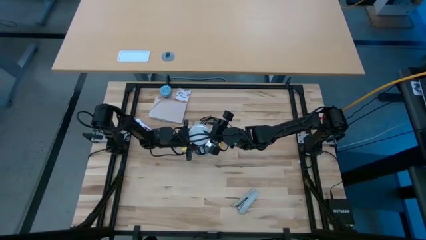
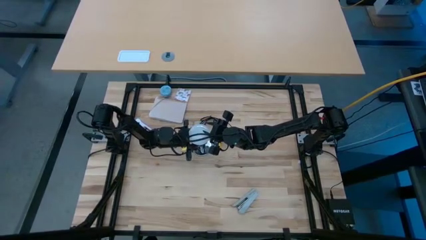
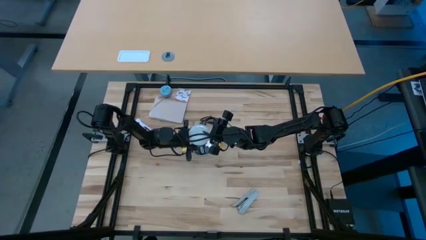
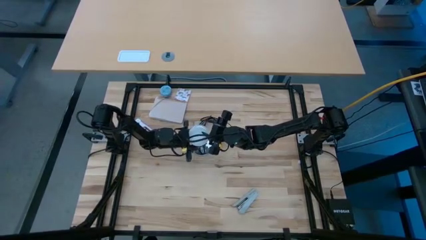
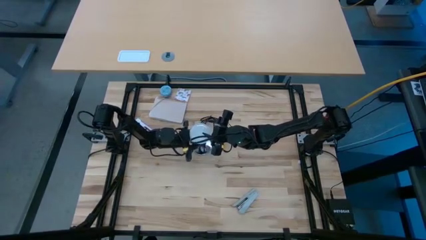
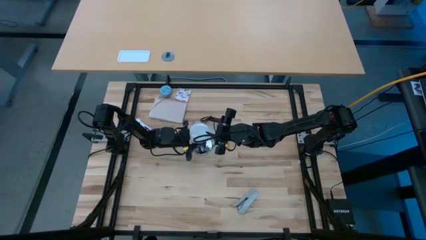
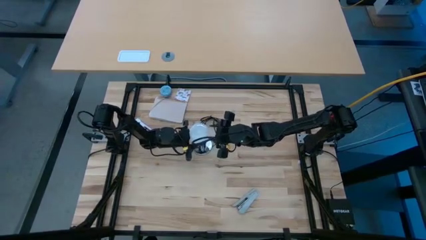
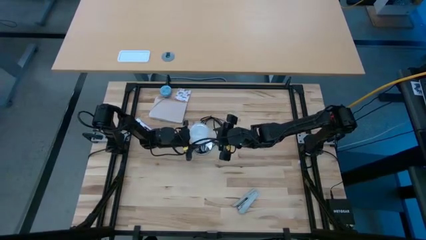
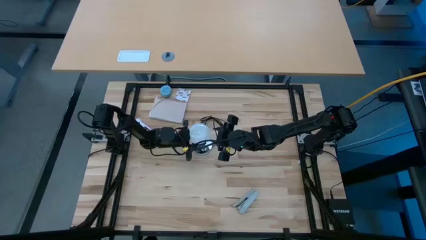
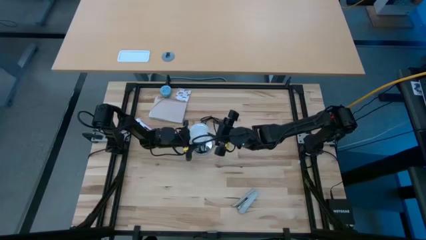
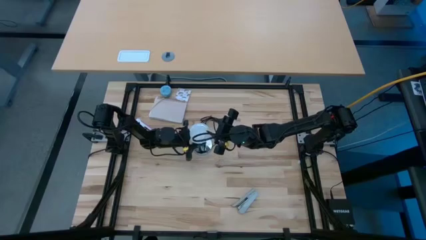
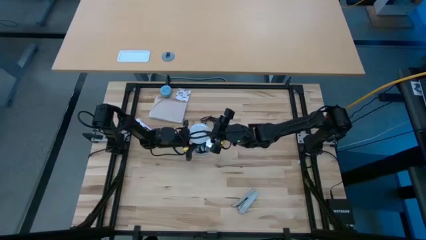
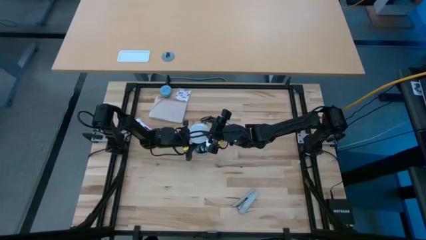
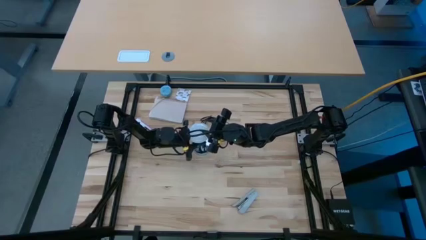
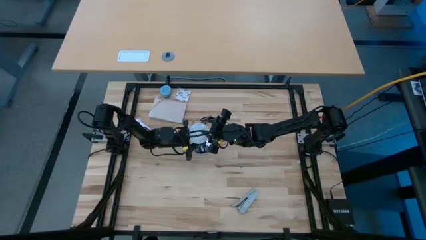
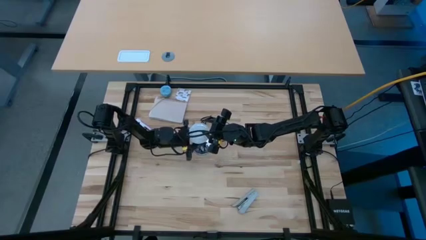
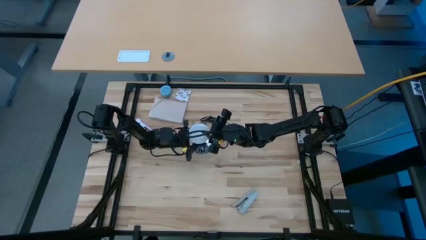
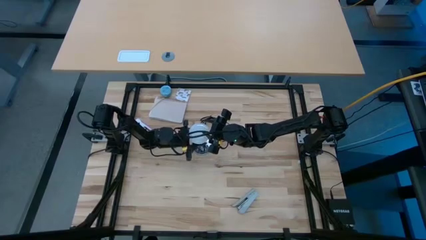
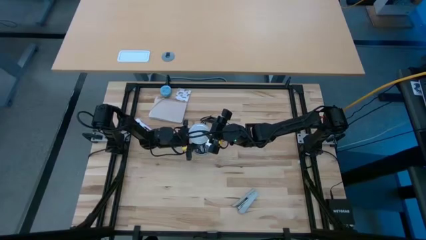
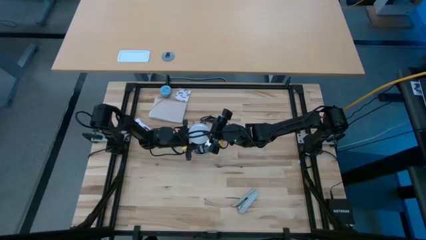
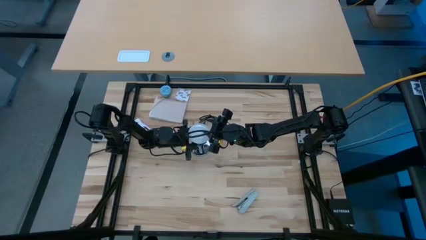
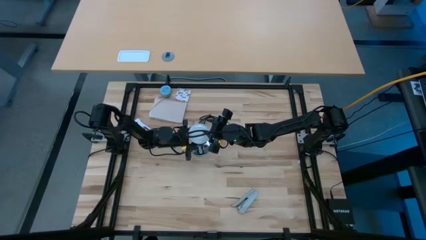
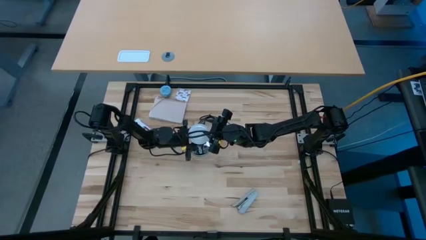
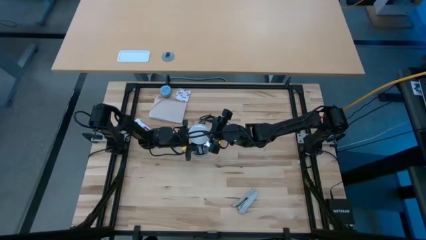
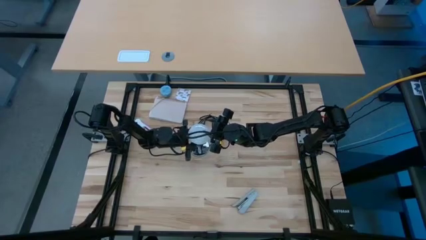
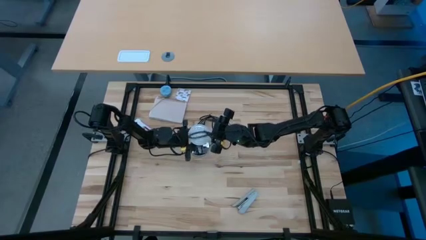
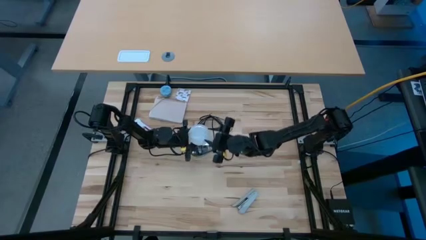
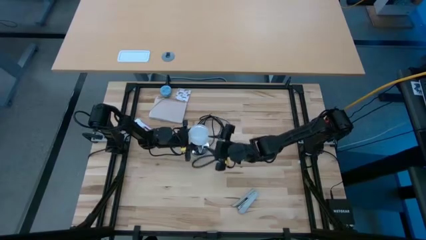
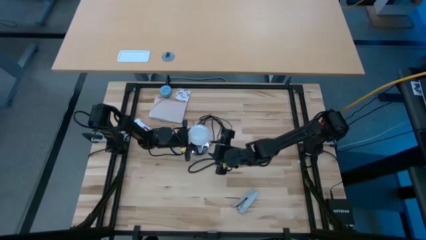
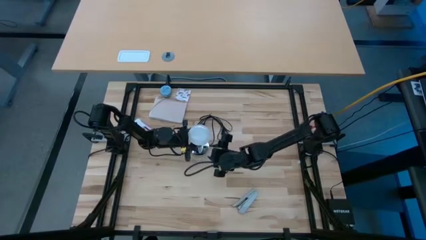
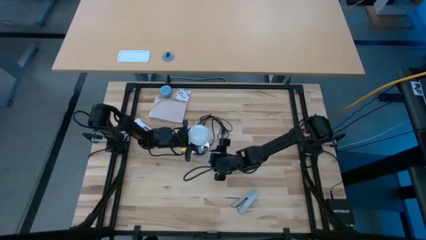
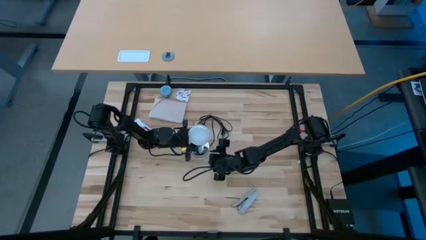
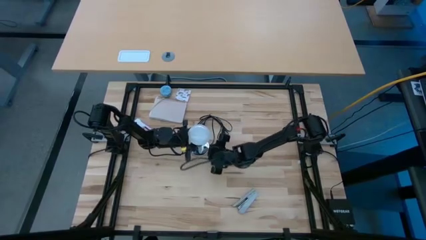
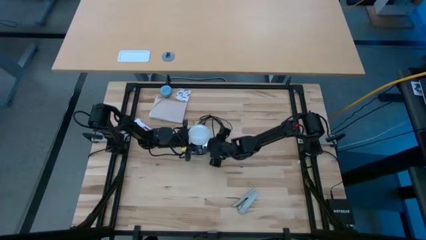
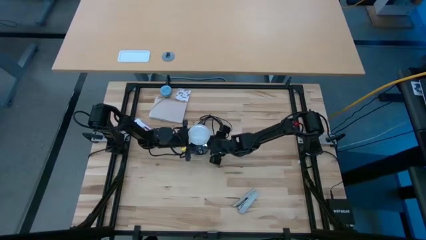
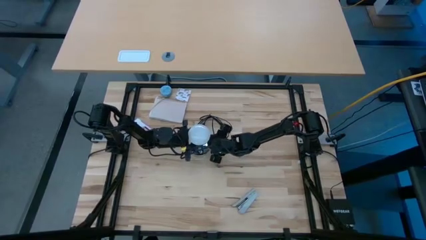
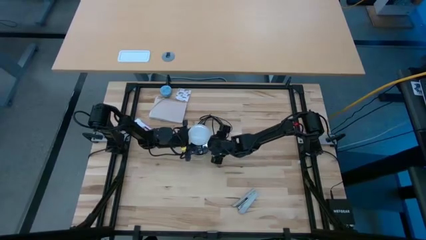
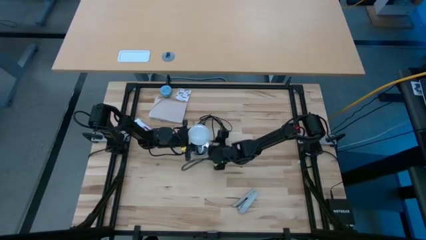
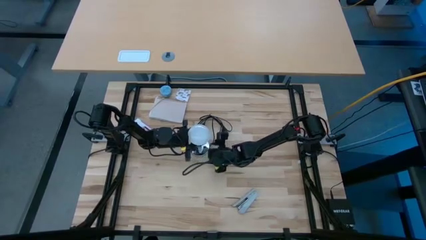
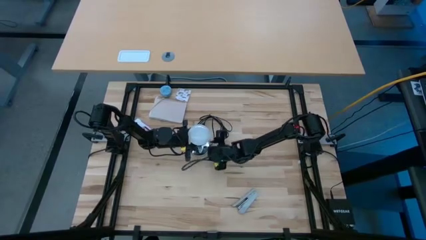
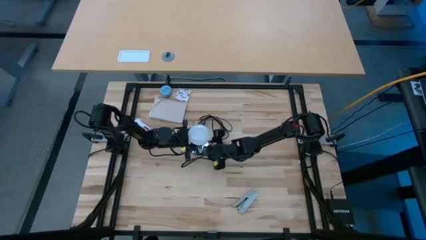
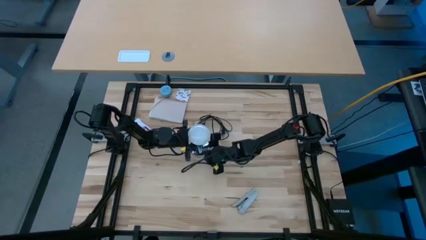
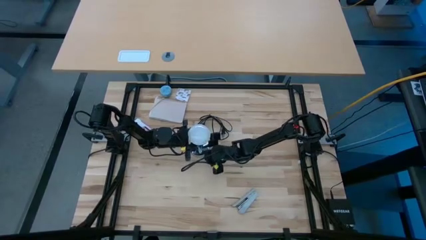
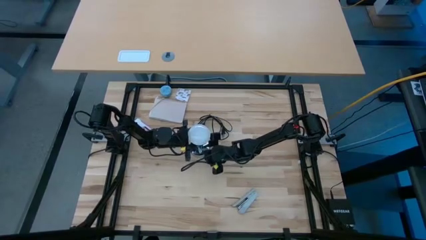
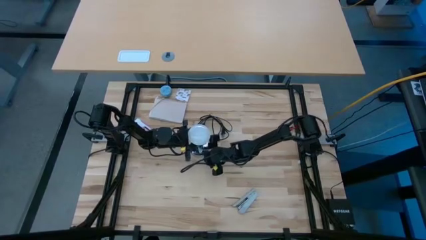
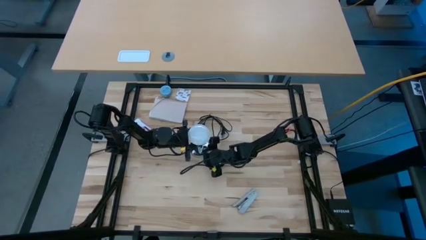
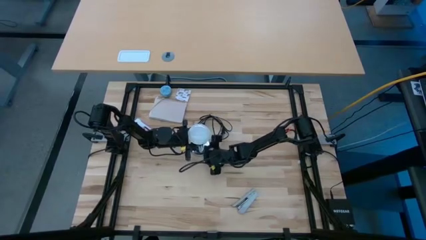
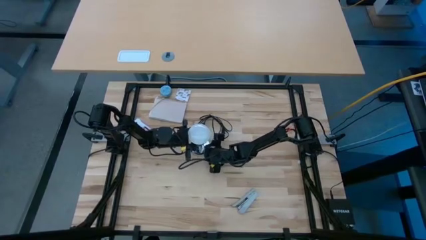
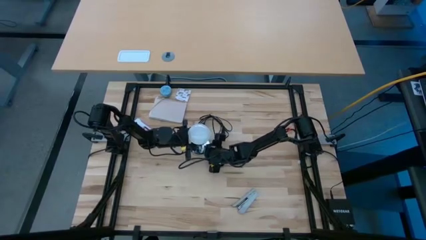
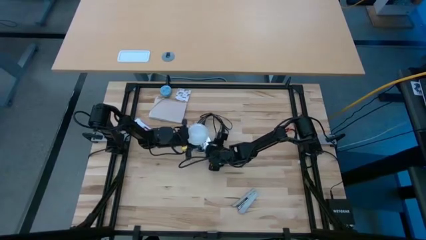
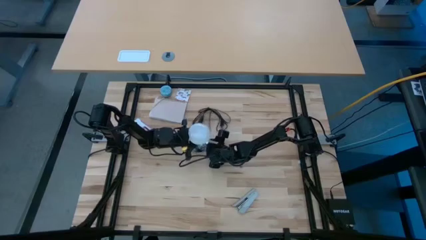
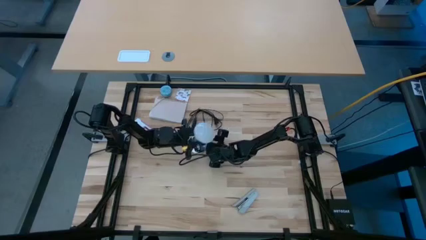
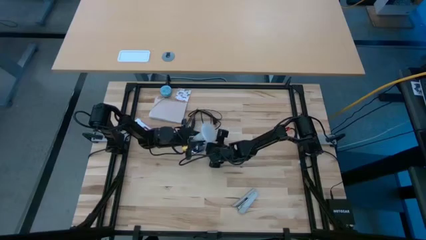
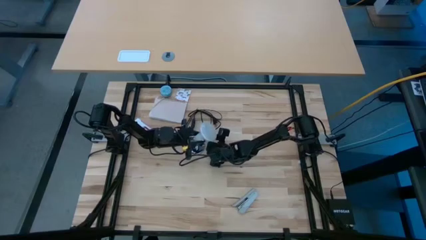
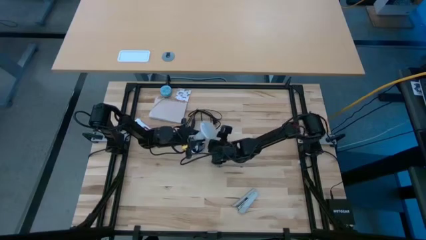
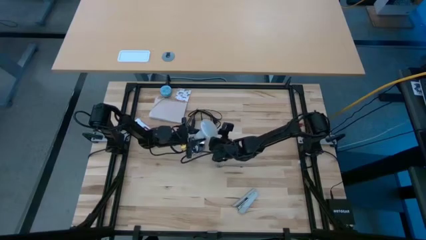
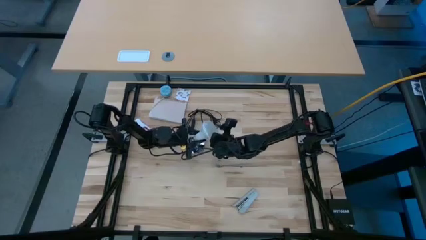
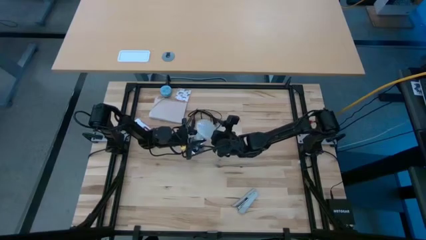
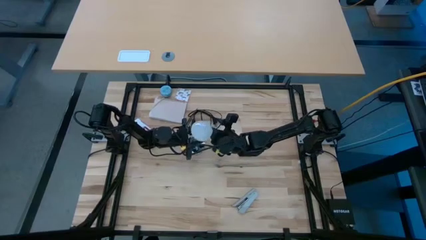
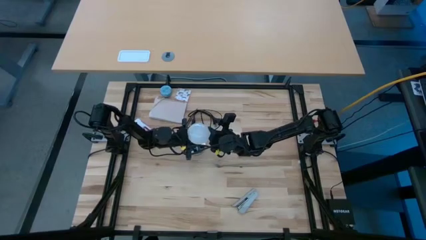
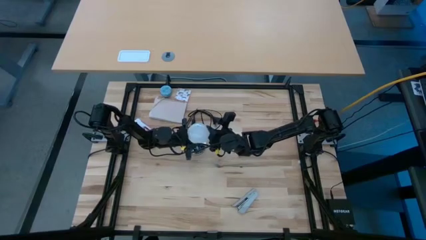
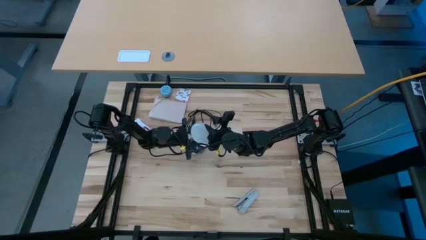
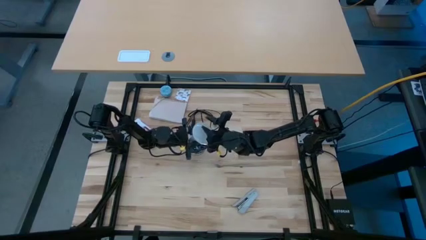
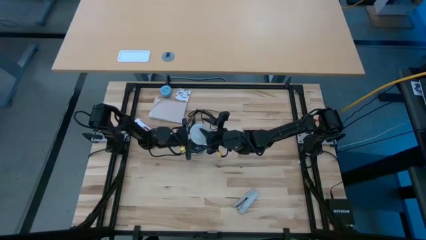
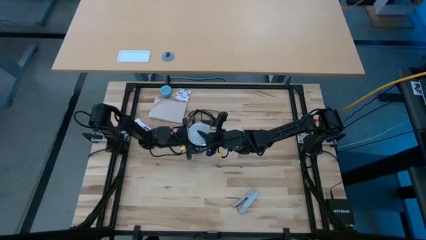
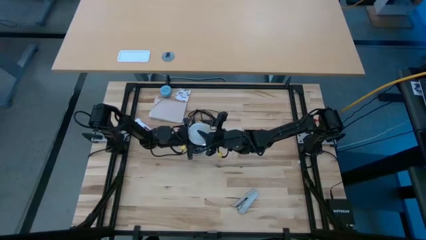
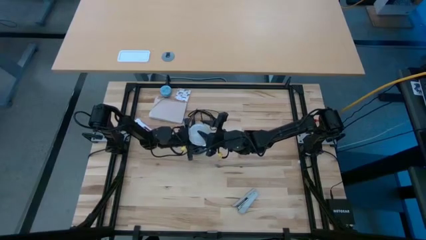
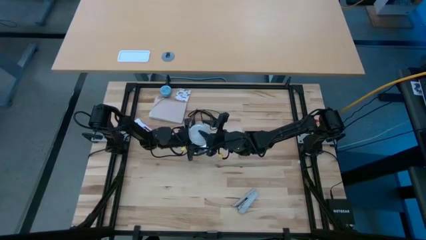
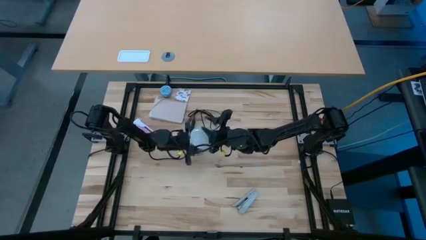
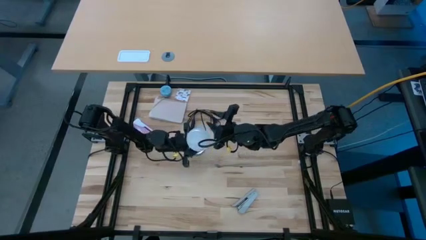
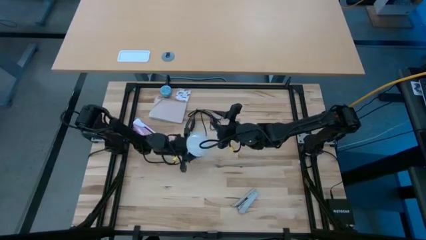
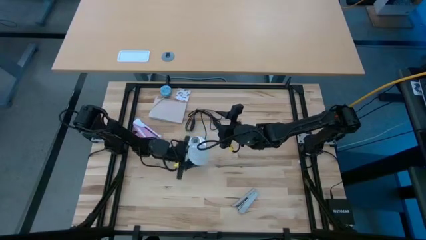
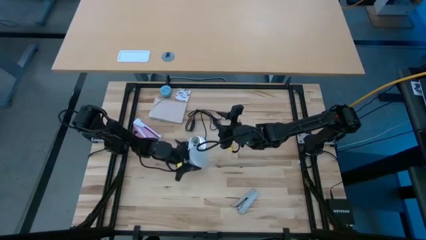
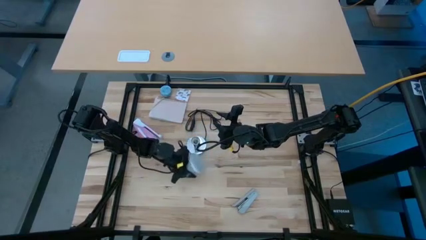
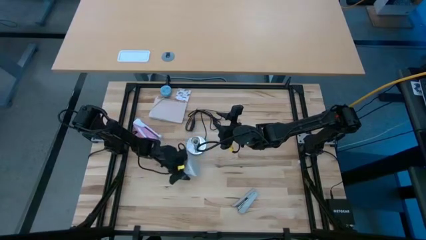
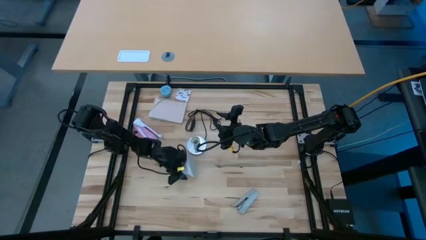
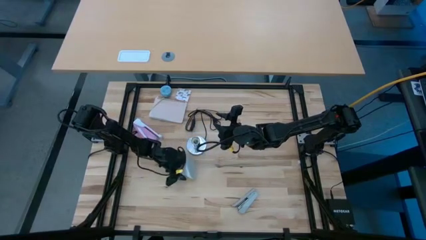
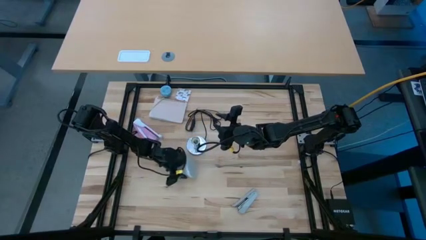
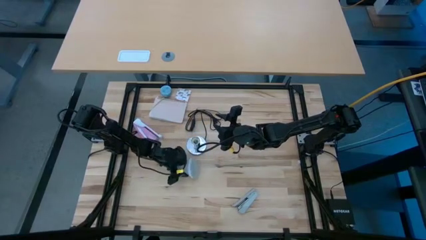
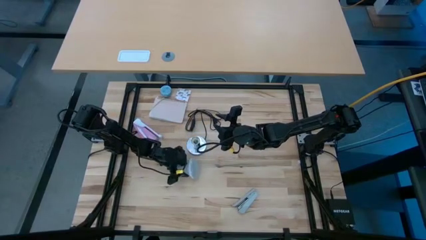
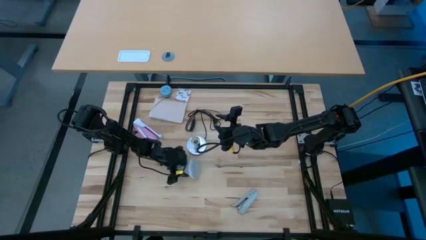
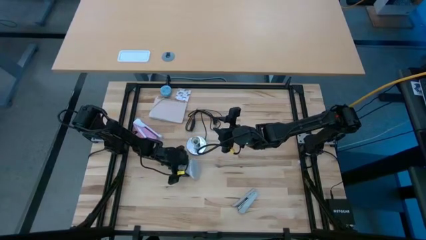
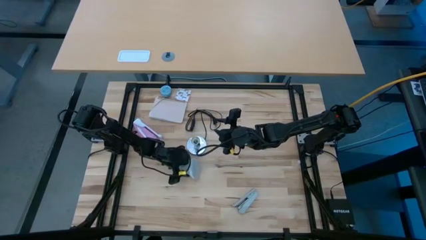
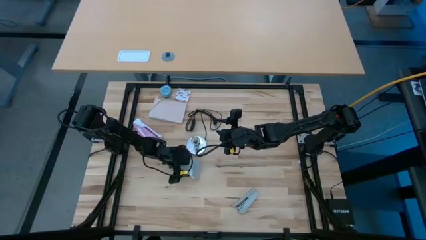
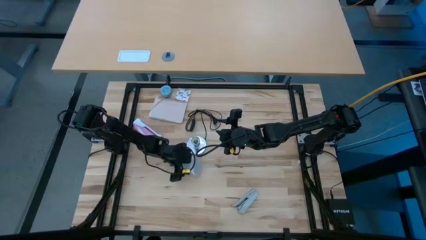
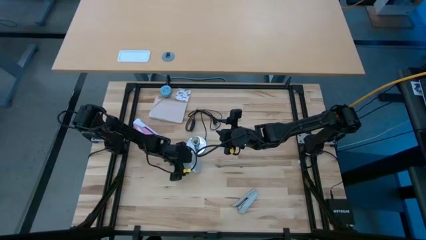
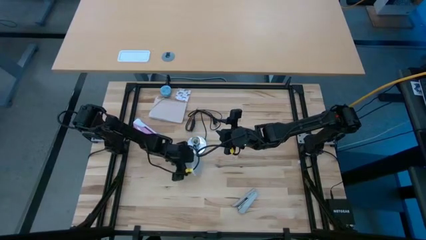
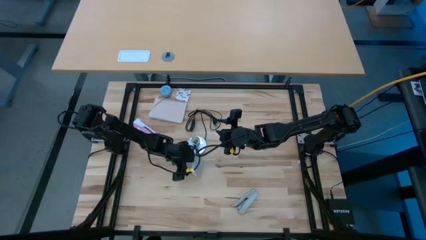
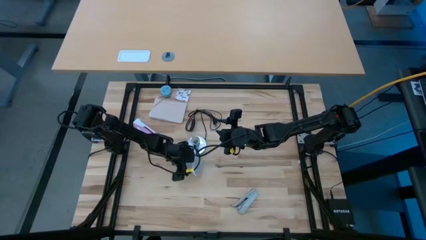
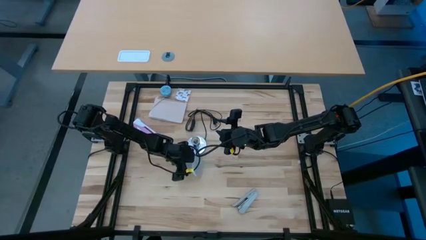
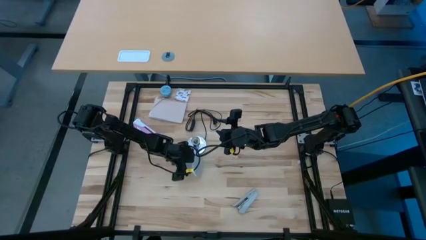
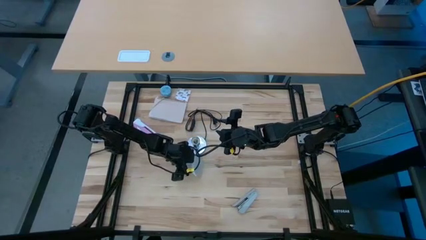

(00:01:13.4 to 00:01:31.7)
Task: Screw lightbulb
Insert the light bulb into the lamp
